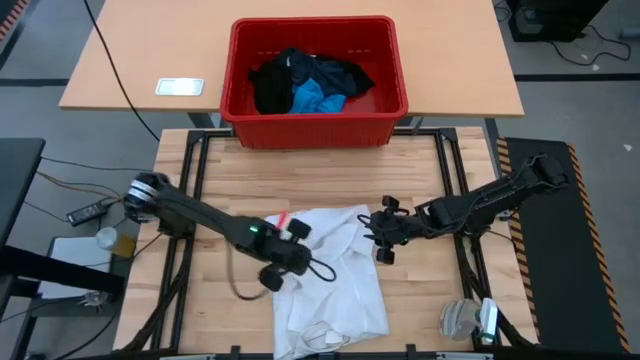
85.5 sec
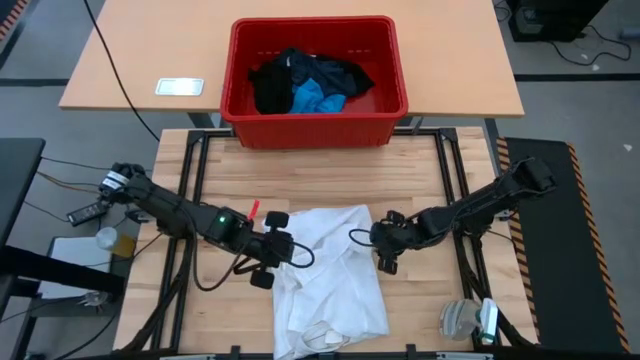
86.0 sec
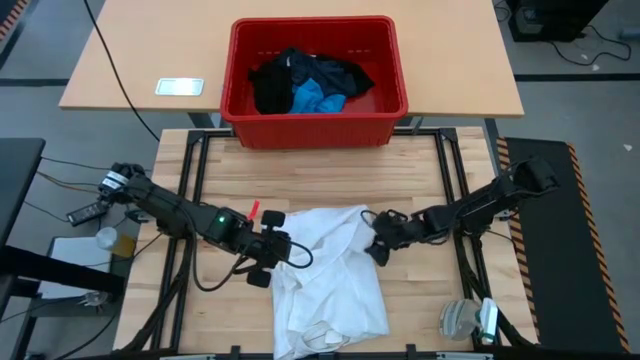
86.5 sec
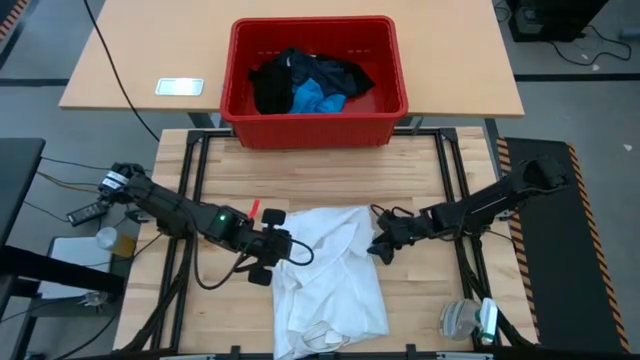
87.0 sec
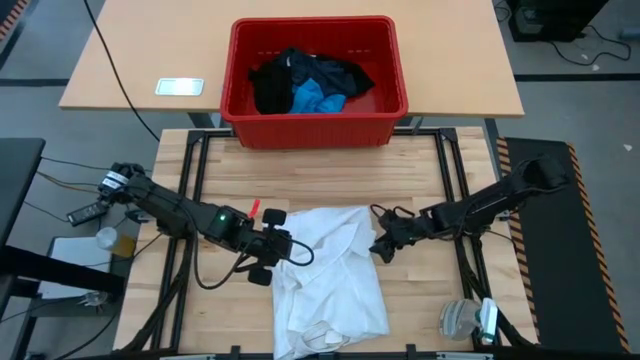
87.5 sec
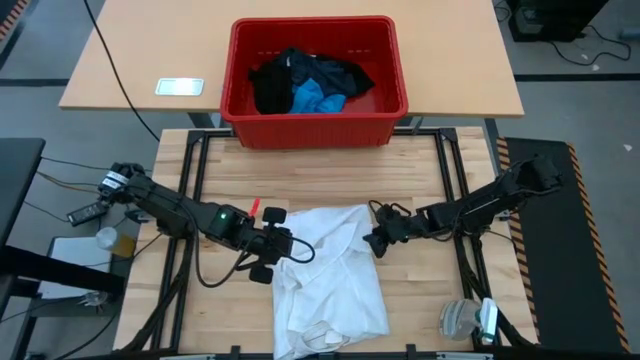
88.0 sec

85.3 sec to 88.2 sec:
Task: Fold laundry
Fold the white polo

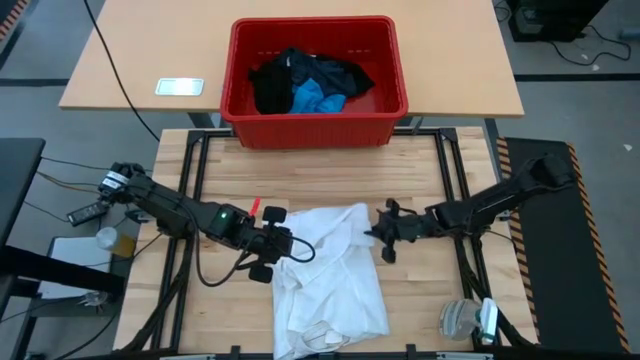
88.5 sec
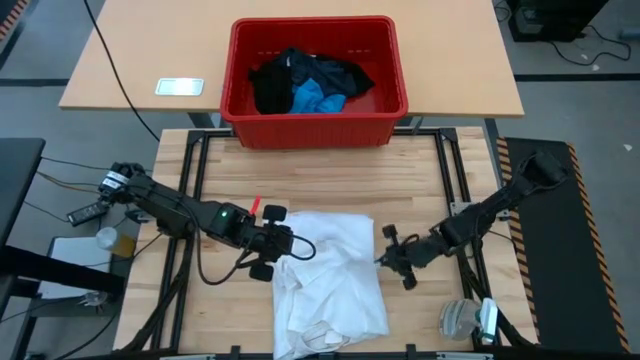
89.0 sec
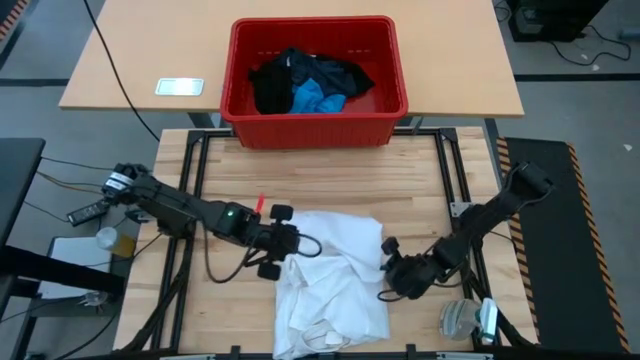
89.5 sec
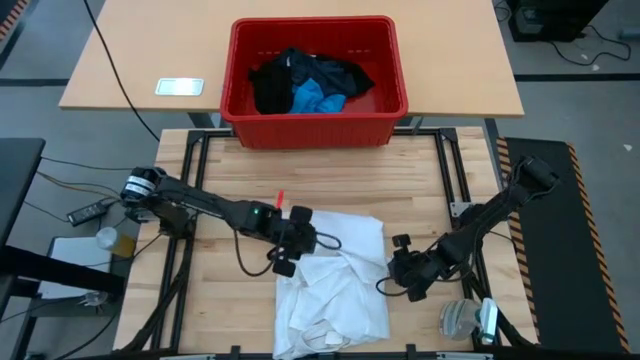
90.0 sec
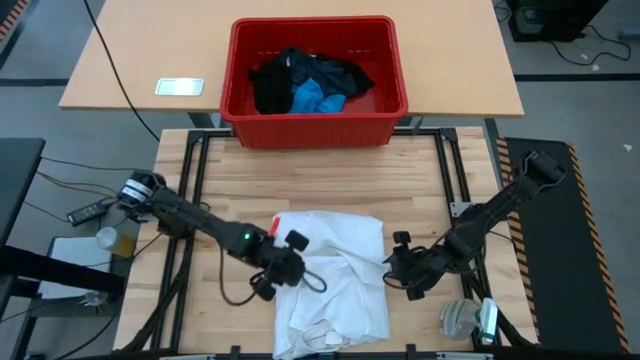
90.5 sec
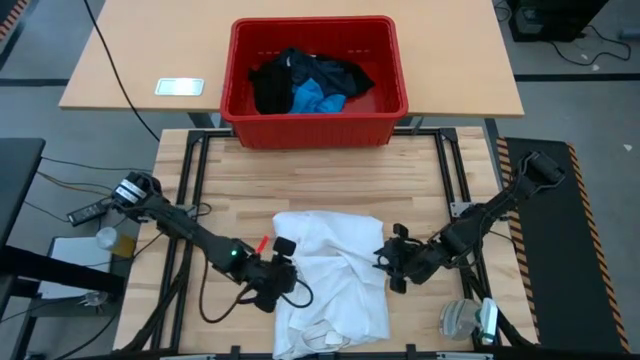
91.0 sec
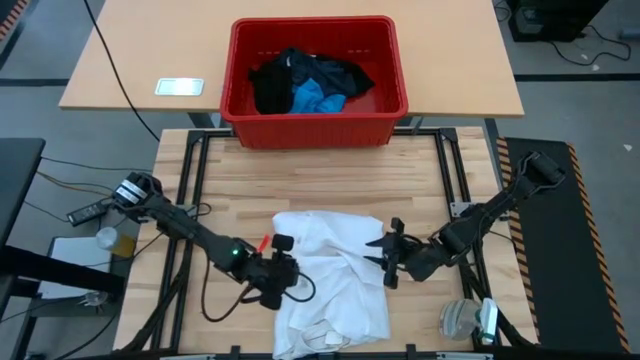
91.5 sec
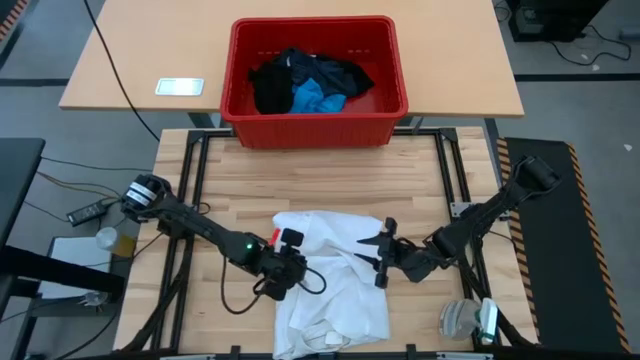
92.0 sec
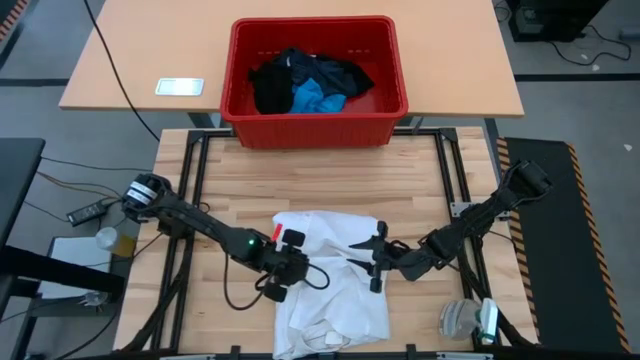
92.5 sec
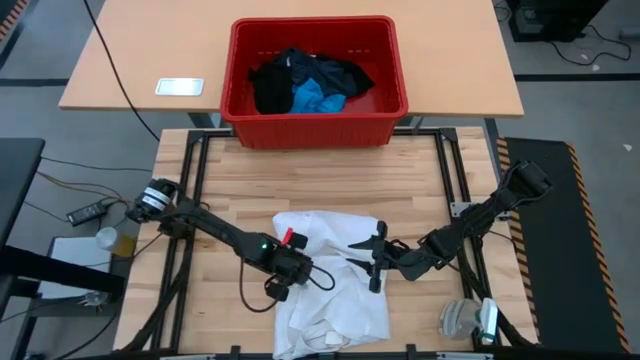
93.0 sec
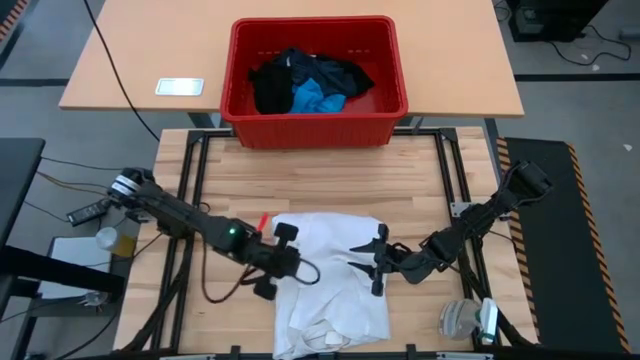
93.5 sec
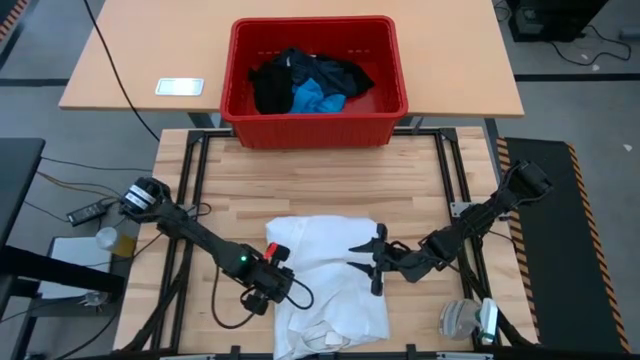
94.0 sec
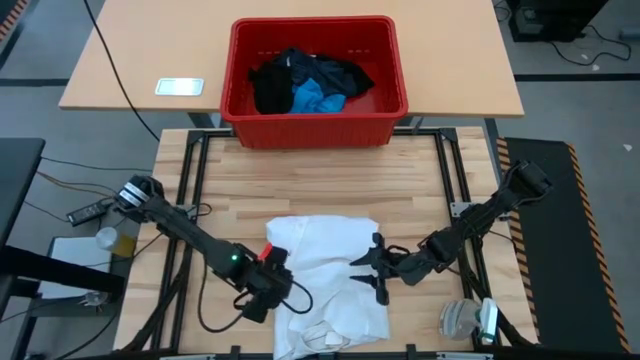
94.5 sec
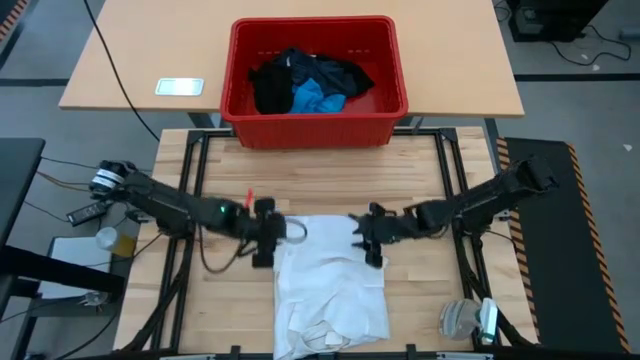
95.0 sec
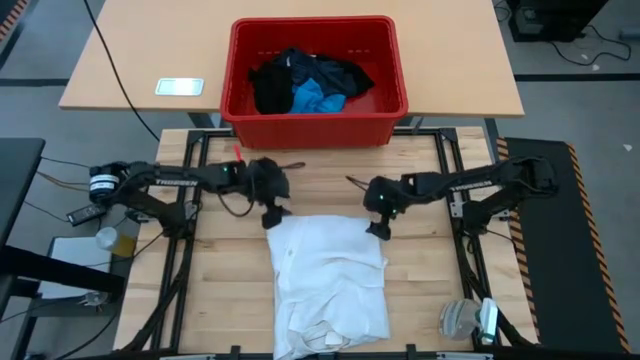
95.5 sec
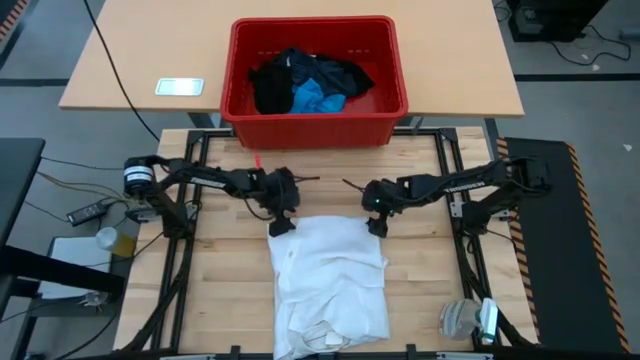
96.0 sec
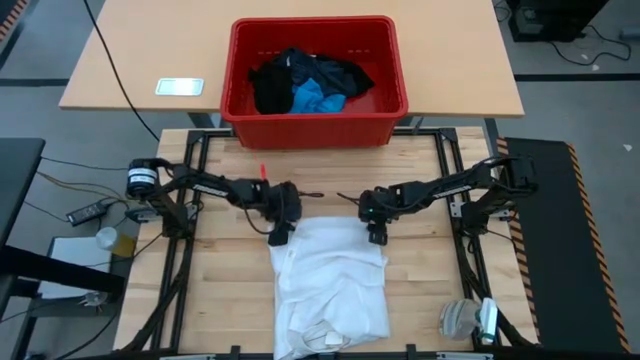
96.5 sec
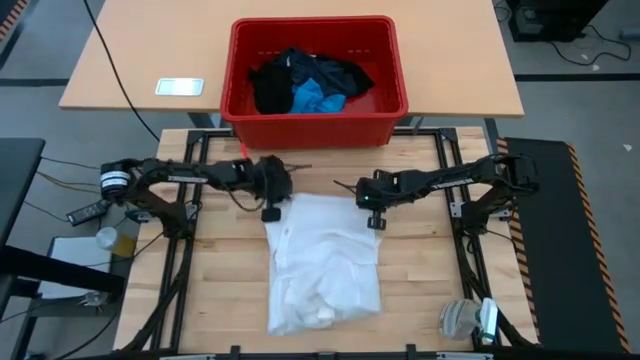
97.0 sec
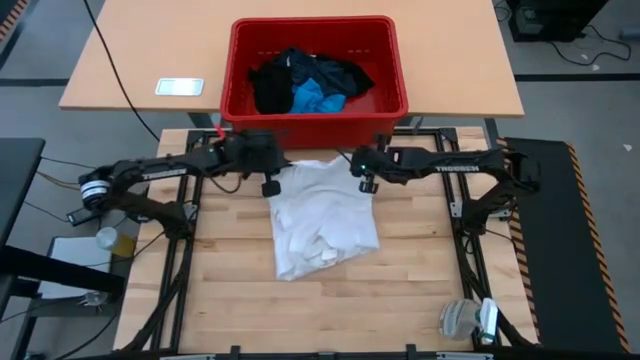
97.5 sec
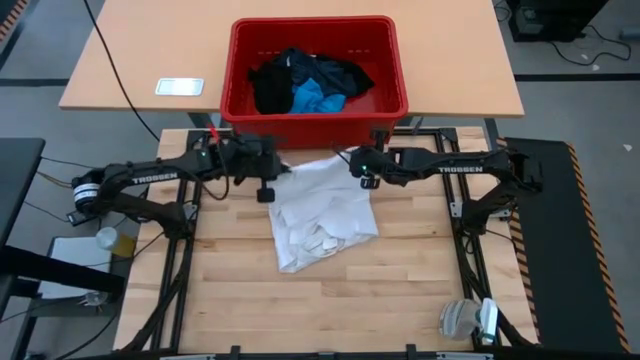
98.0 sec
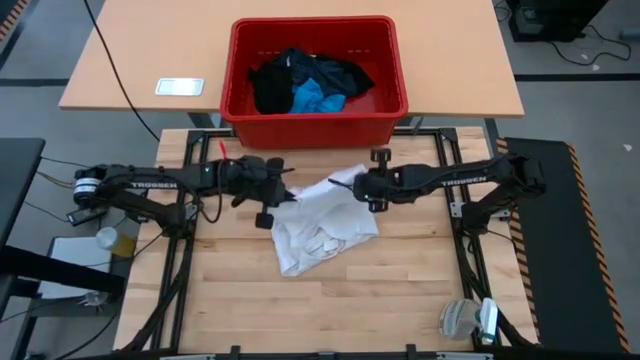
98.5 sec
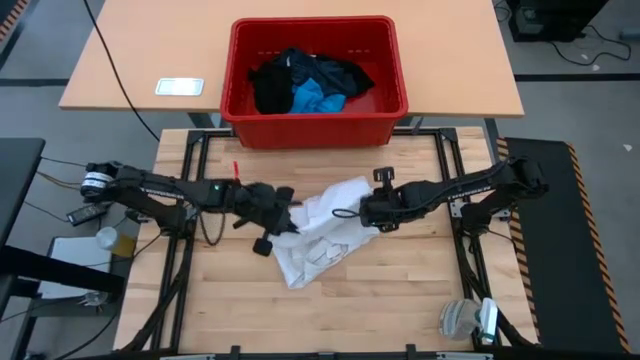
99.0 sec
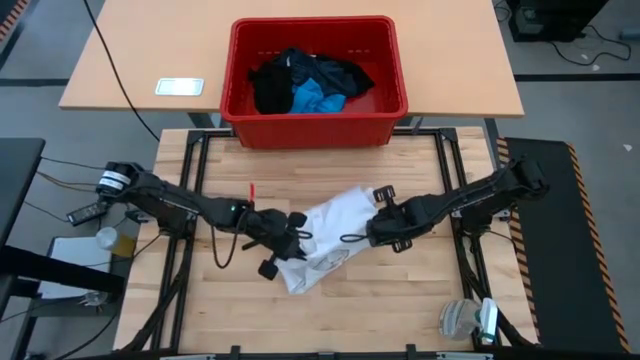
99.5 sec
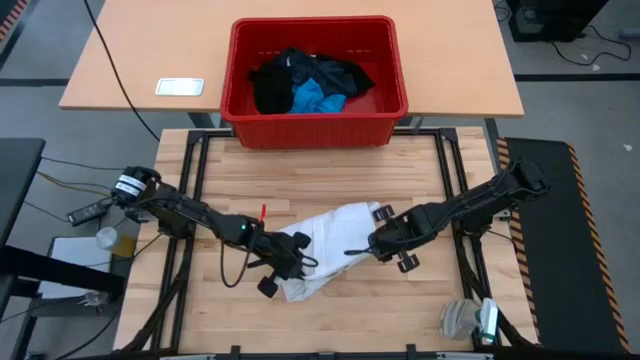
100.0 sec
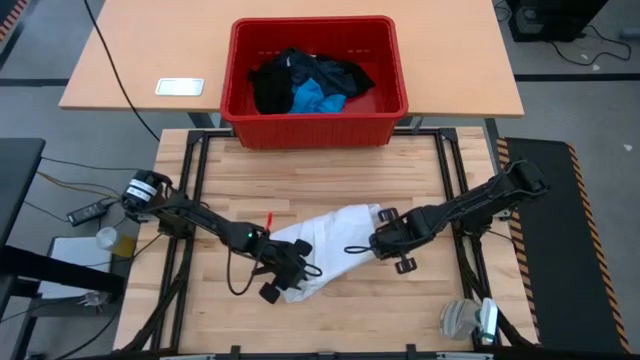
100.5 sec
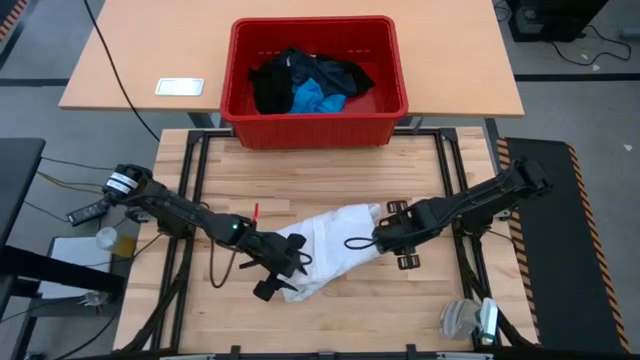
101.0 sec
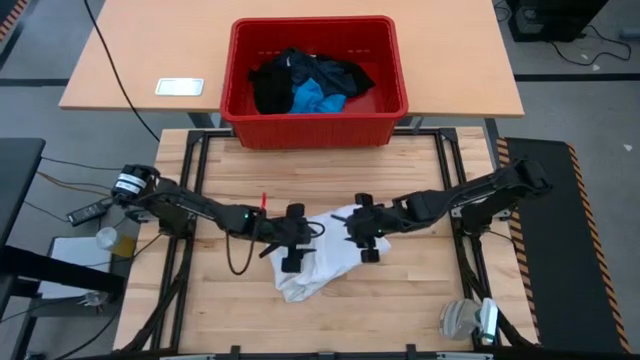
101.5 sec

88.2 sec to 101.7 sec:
Fold the white polo

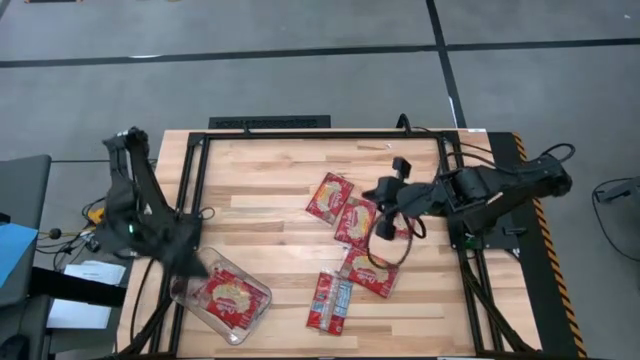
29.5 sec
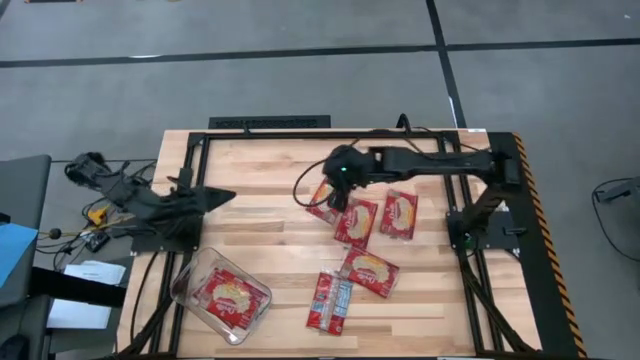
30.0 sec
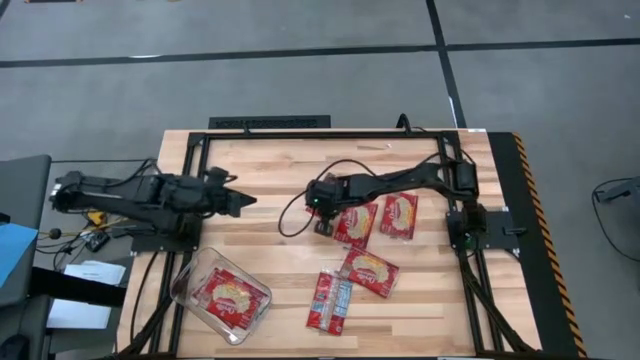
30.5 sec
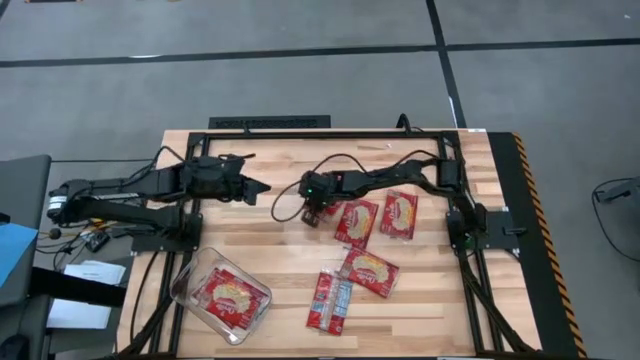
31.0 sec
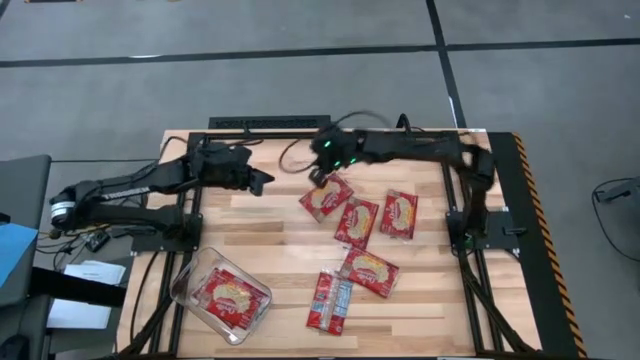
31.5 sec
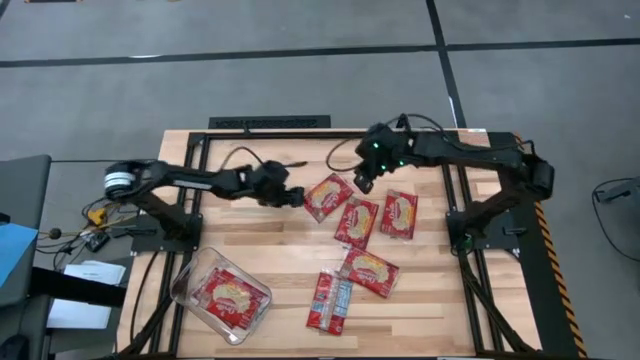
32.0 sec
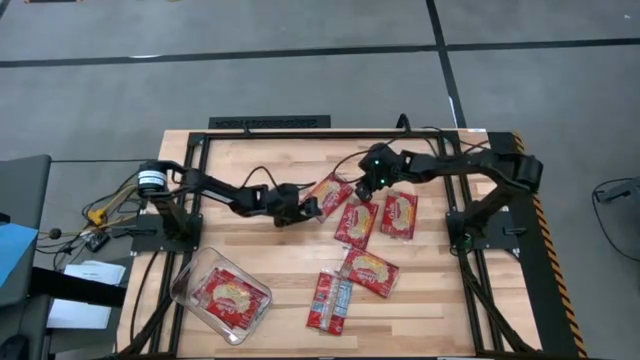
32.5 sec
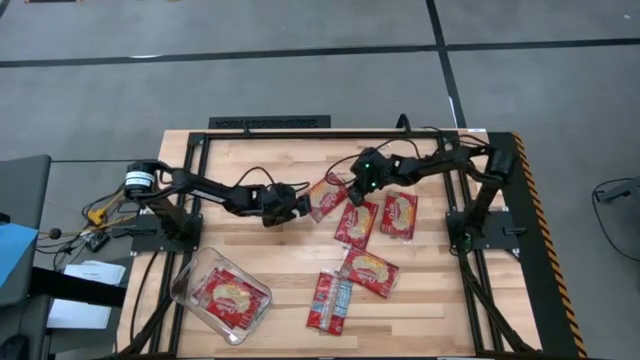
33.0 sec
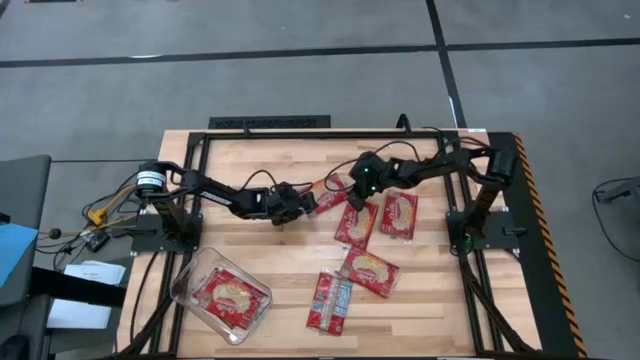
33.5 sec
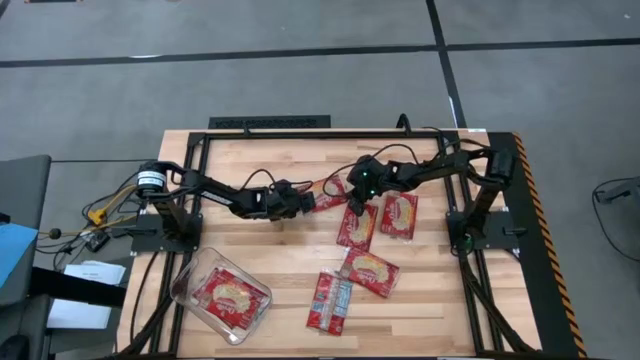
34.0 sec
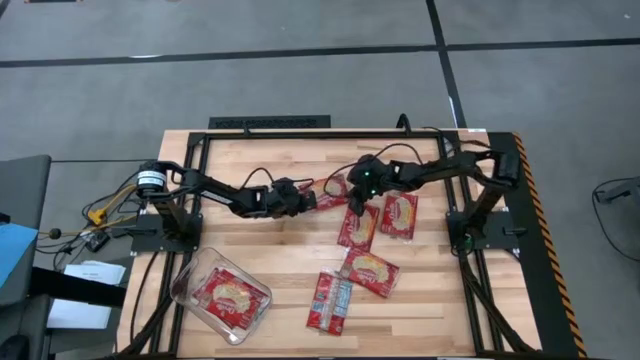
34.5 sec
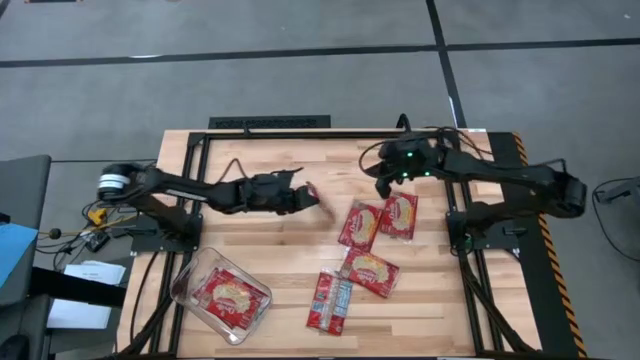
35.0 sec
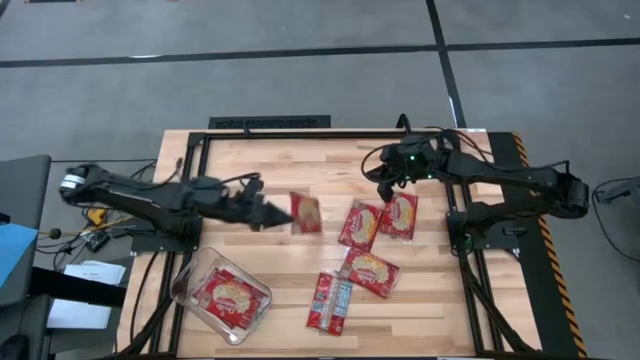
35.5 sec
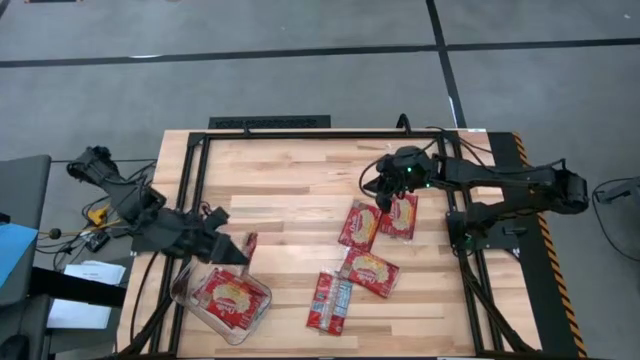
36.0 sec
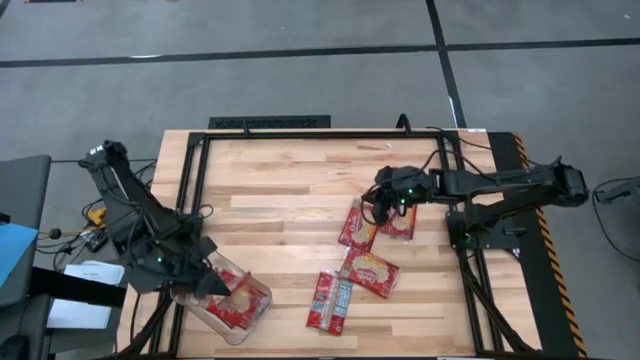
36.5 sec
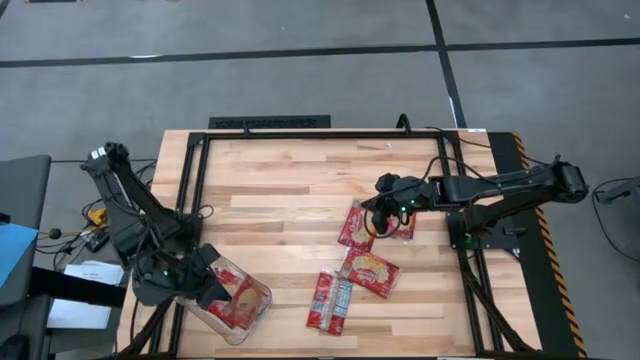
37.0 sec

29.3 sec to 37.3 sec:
Task: Sort popcorn bags into baskets
Put the red popcorn bag into the transparent bin
